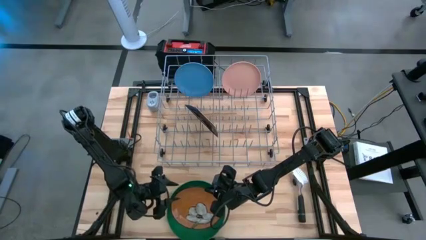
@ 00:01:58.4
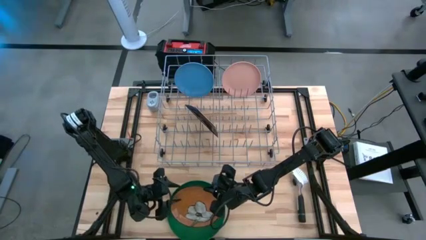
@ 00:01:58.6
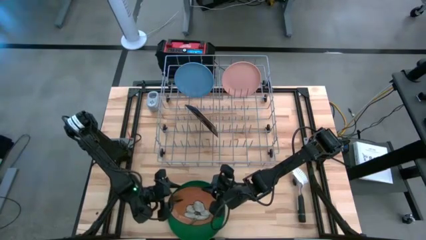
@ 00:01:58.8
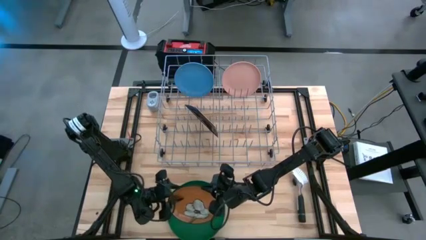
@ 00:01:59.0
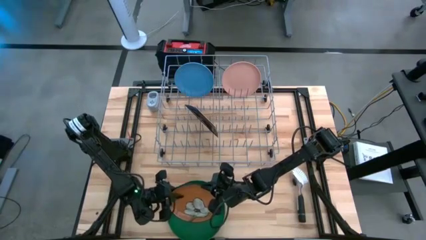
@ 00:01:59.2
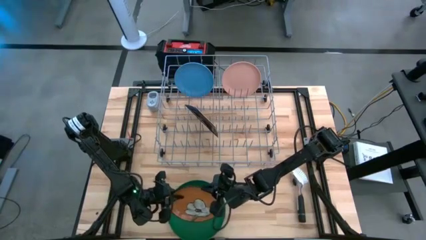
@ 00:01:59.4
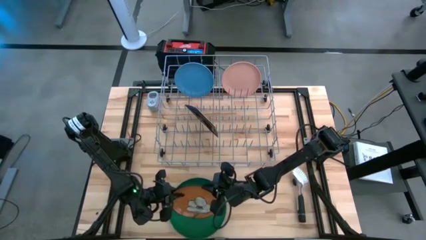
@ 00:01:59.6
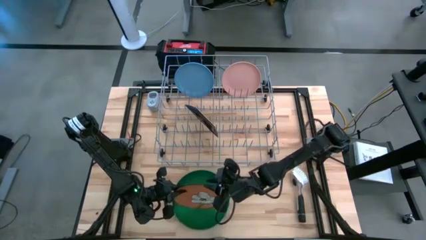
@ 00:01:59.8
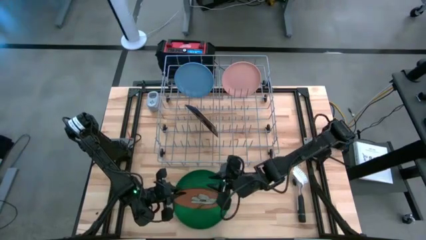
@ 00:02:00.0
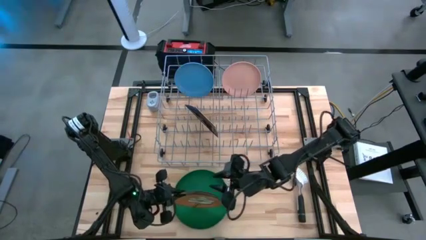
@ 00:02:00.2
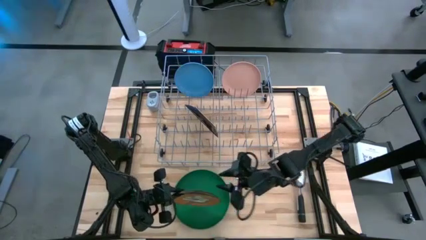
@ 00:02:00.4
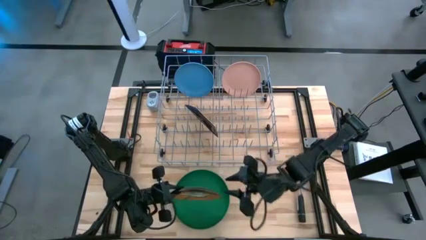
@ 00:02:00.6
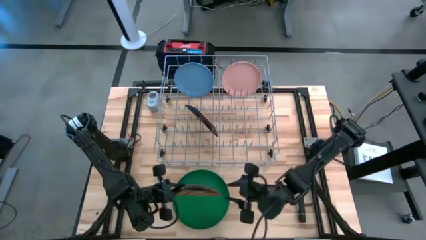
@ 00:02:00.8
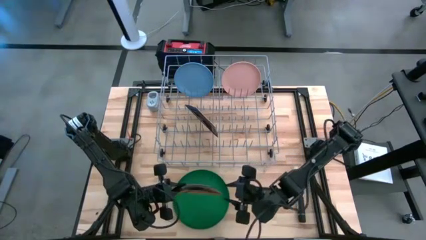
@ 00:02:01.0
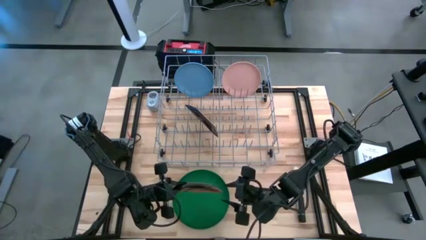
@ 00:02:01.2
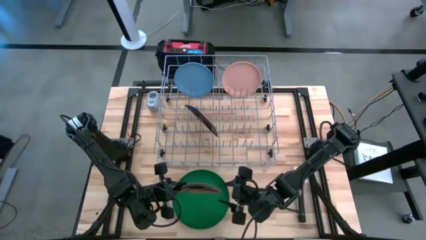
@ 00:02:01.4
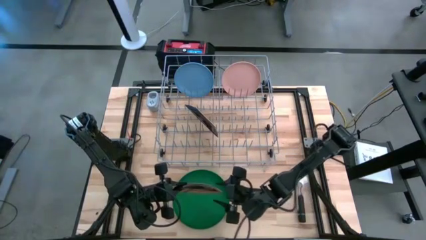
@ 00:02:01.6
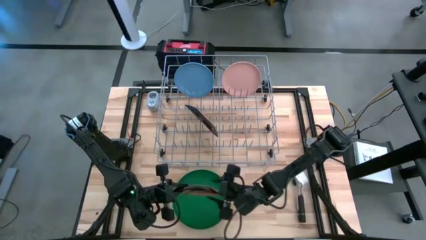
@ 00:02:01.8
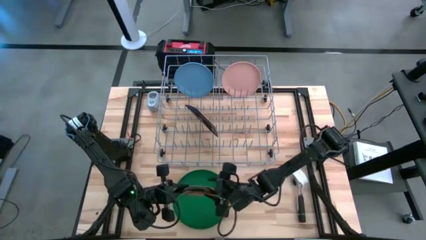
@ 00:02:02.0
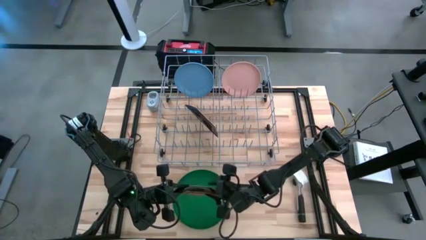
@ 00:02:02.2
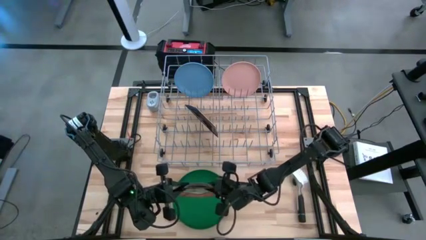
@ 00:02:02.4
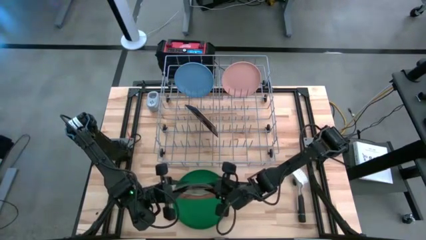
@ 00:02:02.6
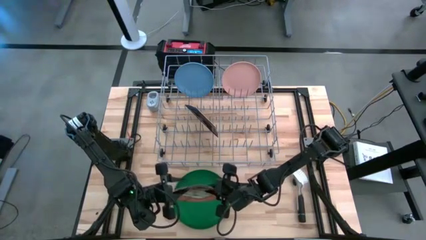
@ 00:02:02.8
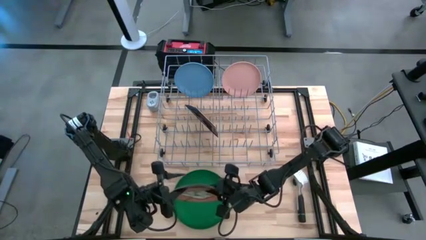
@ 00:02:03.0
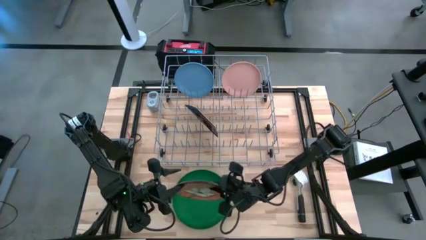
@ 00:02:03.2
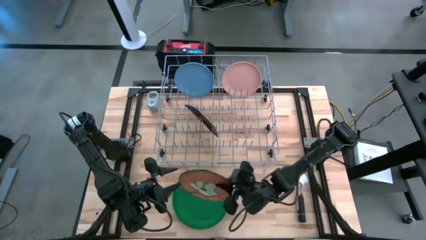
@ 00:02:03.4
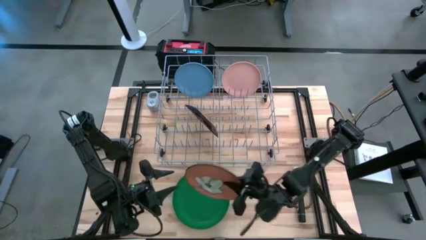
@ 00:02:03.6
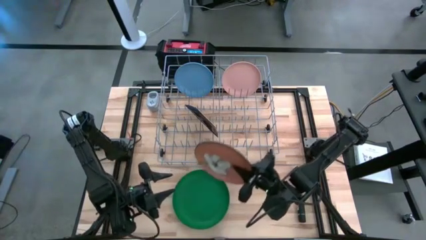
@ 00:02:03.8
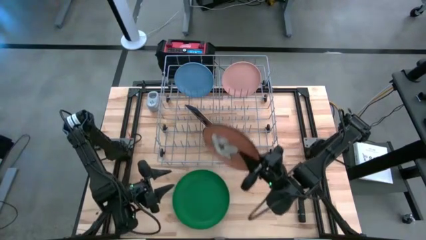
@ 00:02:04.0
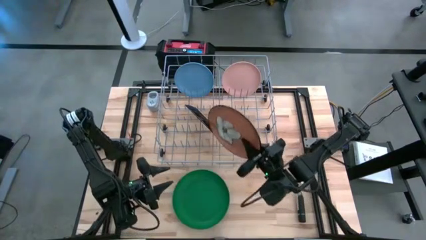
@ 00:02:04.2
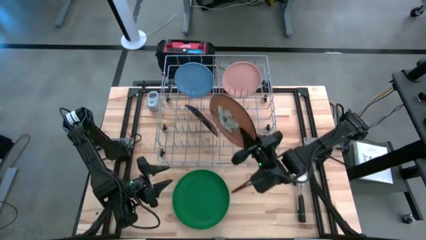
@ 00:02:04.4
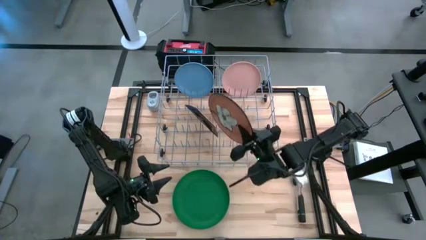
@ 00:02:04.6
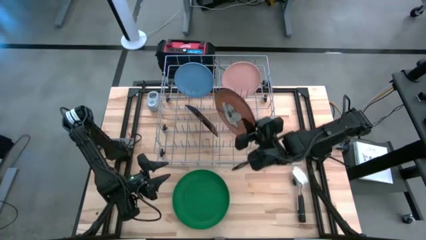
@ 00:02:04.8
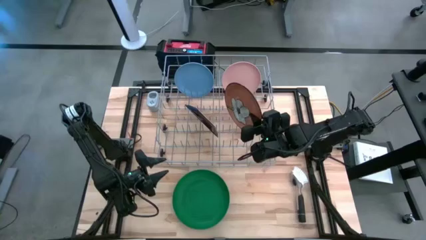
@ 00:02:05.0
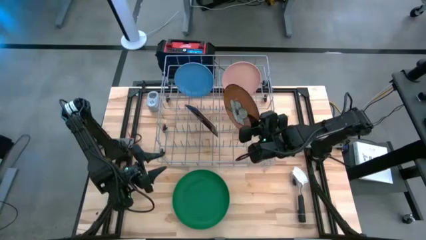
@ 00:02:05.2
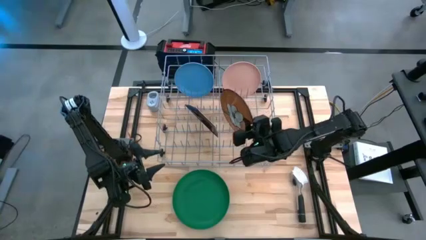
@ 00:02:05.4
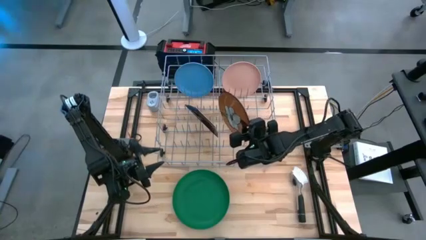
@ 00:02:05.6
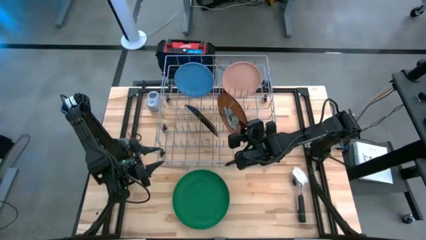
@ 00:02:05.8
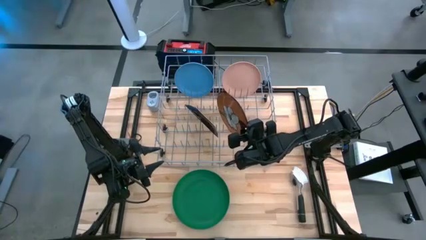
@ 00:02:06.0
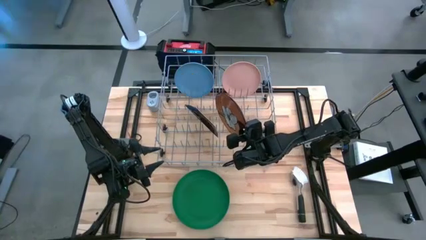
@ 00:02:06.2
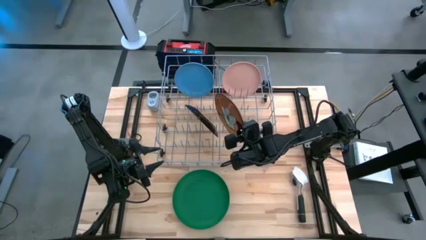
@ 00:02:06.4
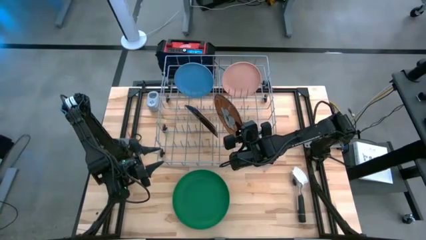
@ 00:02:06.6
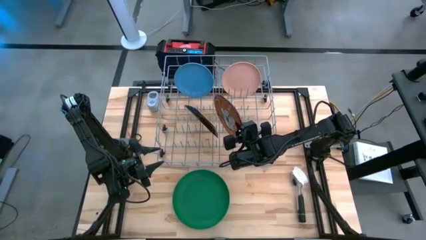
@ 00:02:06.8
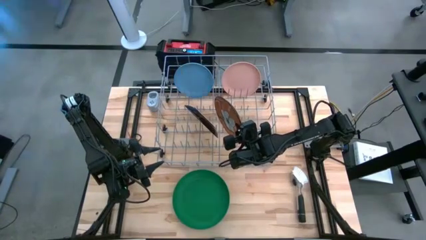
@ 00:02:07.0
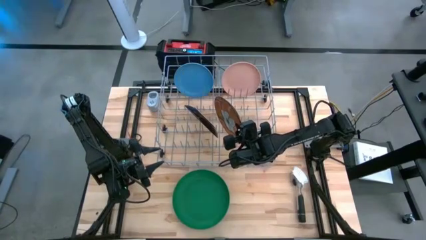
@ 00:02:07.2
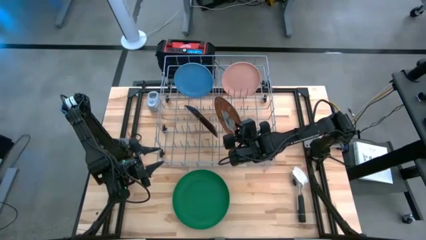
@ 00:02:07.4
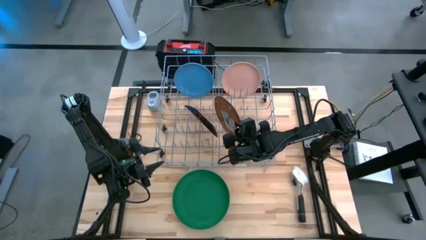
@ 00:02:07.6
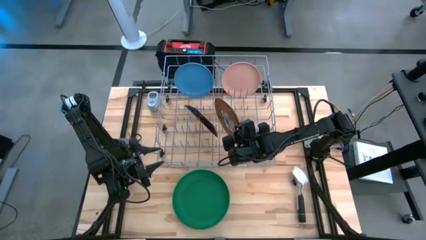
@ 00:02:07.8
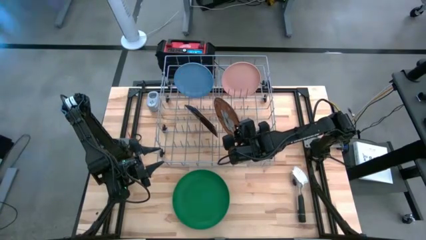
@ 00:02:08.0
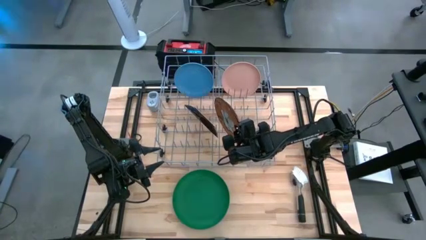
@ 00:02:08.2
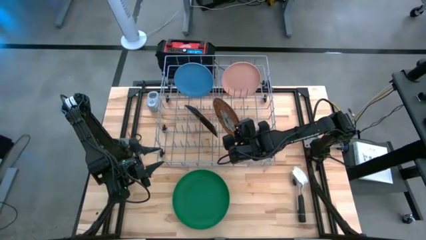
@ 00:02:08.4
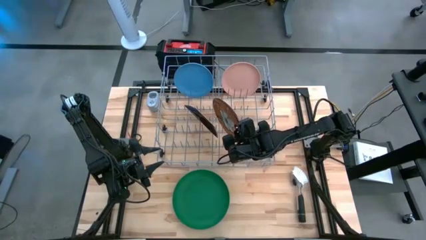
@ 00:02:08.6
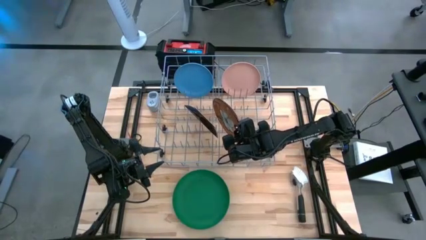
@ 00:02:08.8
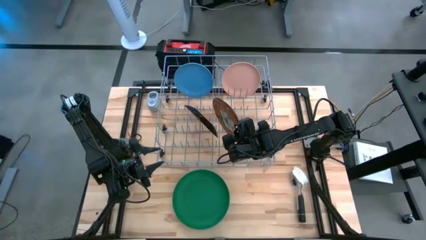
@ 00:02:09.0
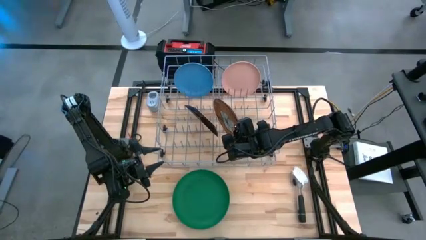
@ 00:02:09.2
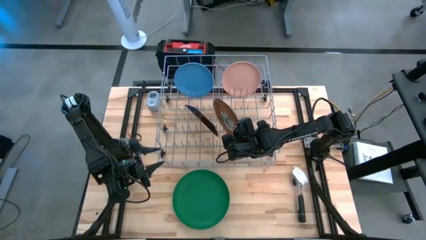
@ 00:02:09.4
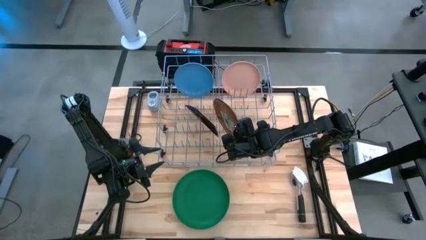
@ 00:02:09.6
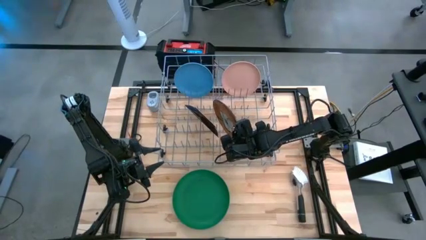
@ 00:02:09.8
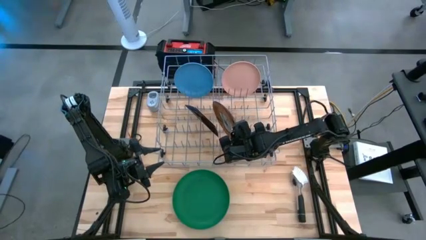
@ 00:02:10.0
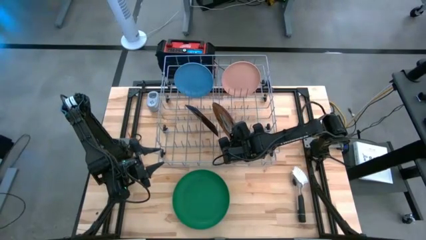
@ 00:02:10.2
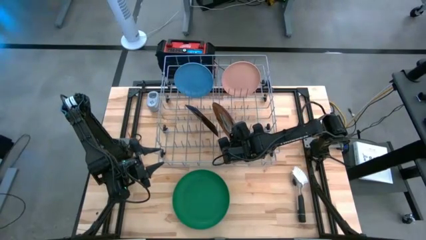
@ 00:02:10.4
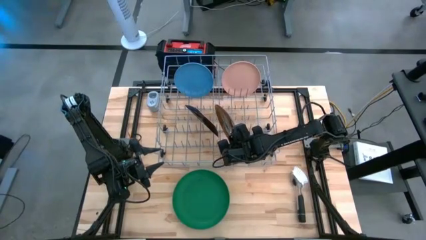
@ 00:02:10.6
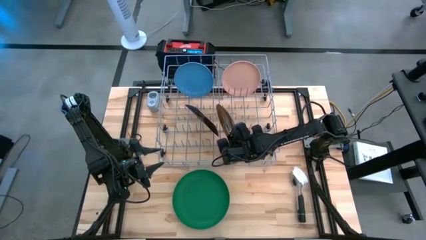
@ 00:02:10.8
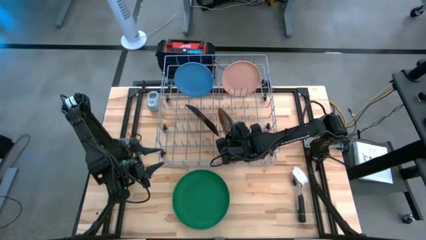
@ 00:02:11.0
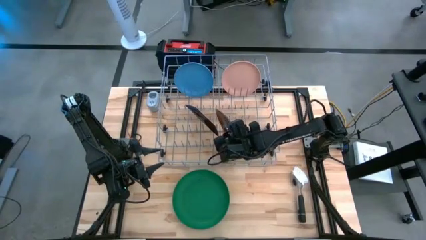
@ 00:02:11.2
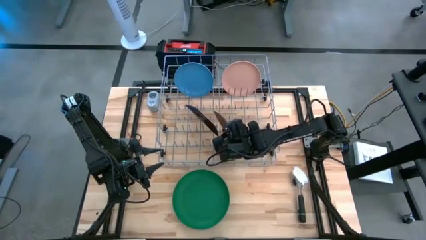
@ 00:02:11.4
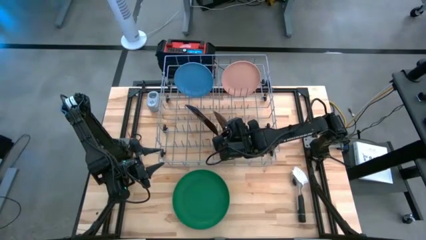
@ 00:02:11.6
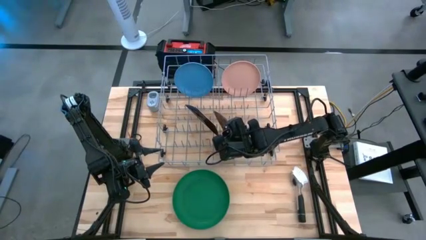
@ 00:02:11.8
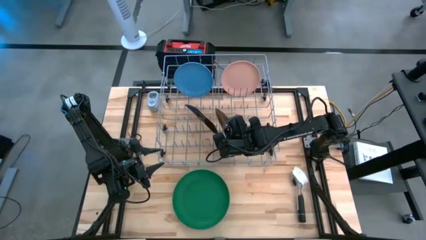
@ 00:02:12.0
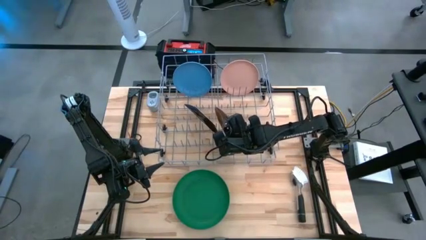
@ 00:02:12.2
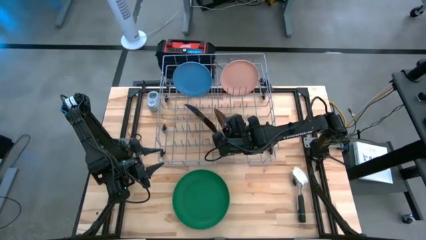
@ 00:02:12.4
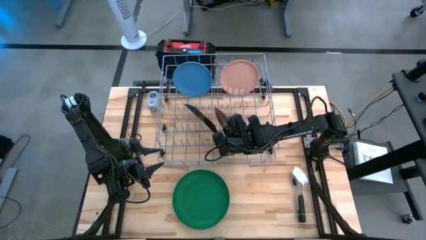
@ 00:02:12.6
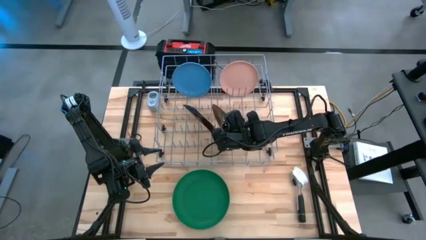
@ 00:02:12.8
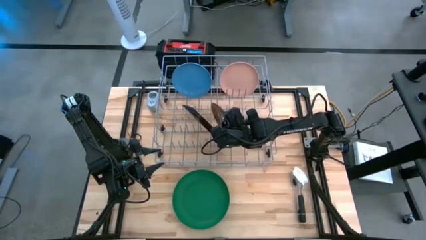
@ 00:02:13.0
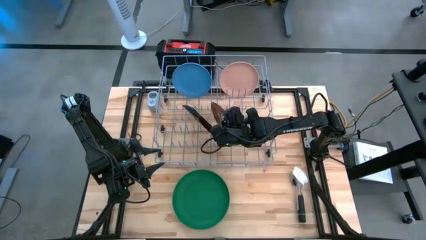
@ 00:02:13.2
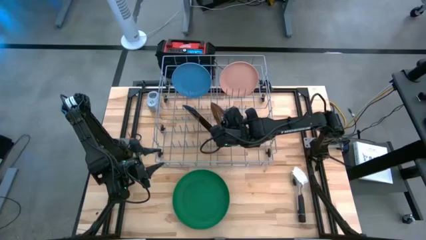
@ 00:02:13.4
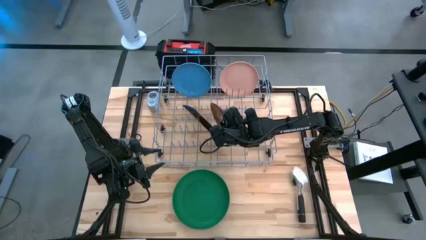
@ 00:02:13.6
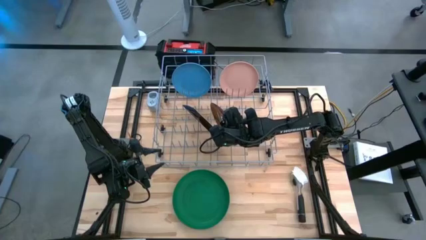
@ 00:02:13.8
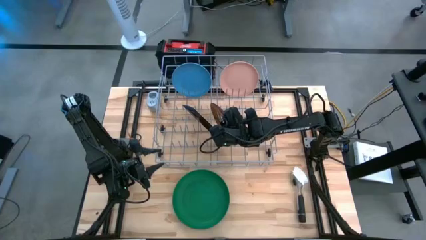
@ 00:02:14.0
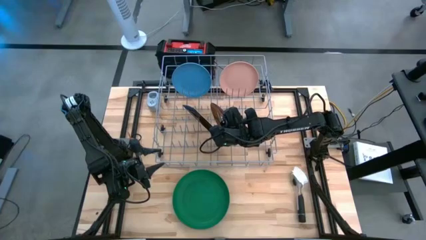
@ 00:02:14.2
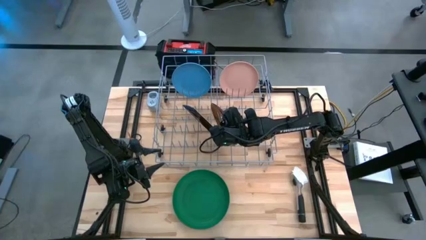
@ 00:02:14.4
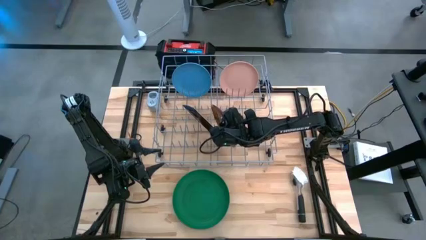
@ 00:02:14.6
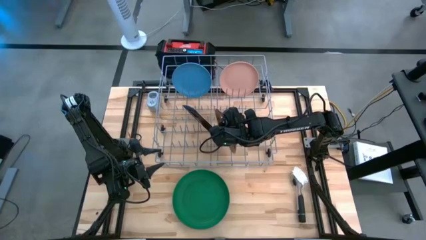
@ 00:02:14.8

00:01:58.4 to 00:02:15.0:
Task: Sort dishes
Put the orange floral plate into the dish rack
